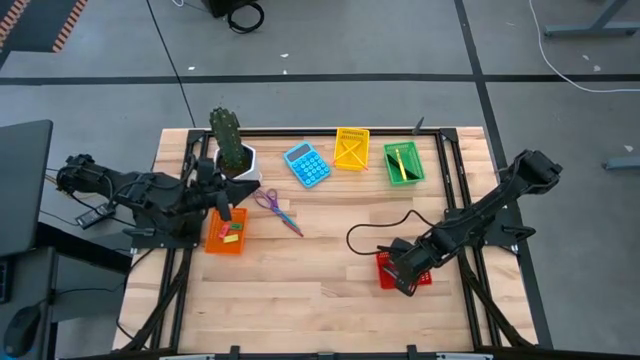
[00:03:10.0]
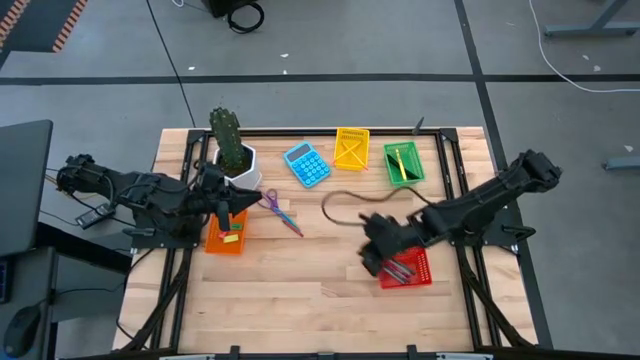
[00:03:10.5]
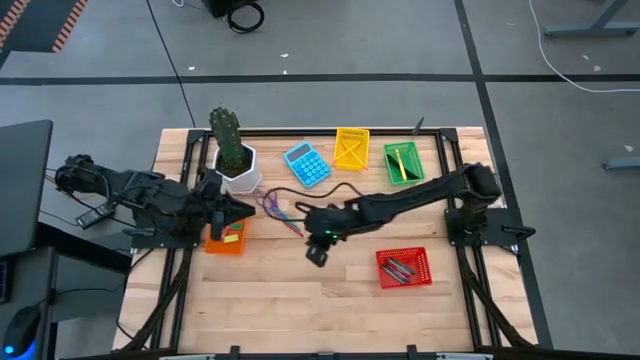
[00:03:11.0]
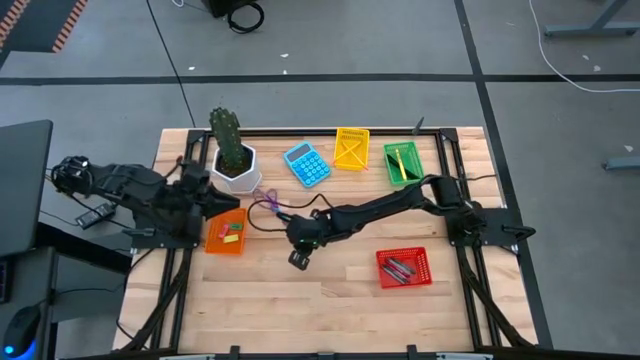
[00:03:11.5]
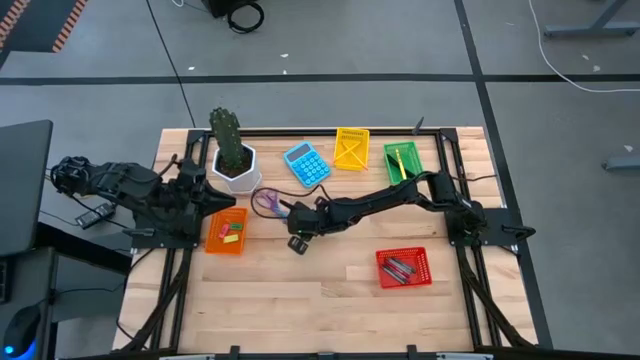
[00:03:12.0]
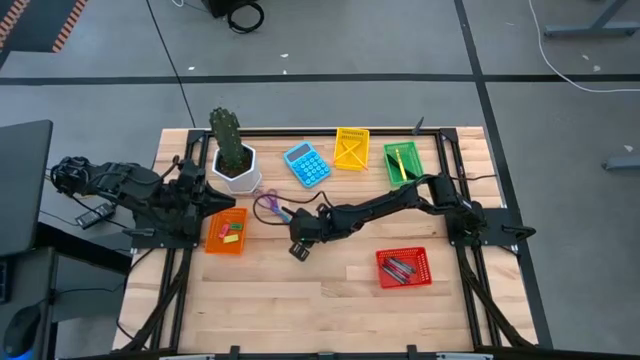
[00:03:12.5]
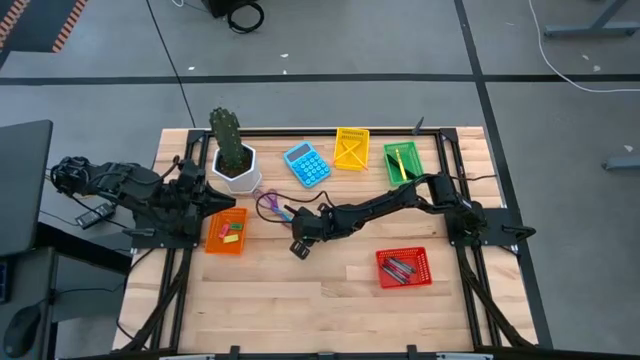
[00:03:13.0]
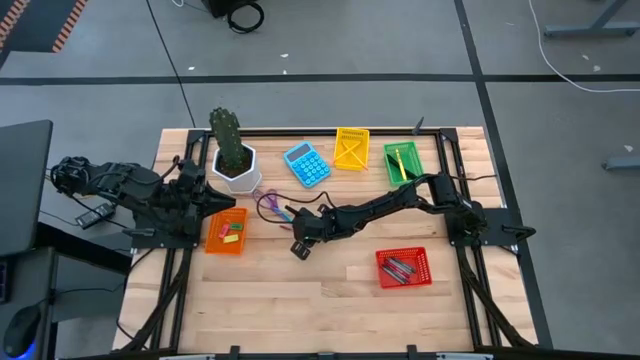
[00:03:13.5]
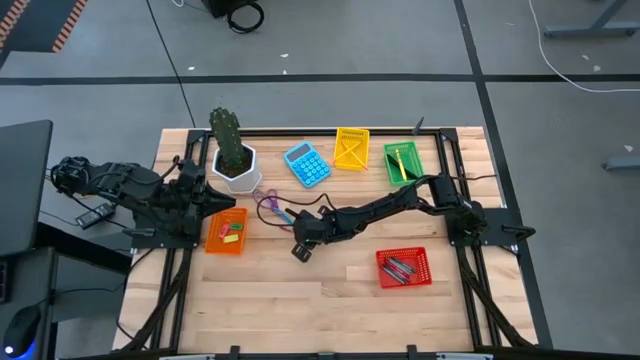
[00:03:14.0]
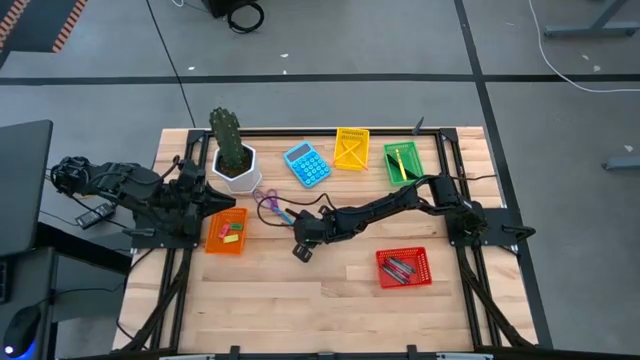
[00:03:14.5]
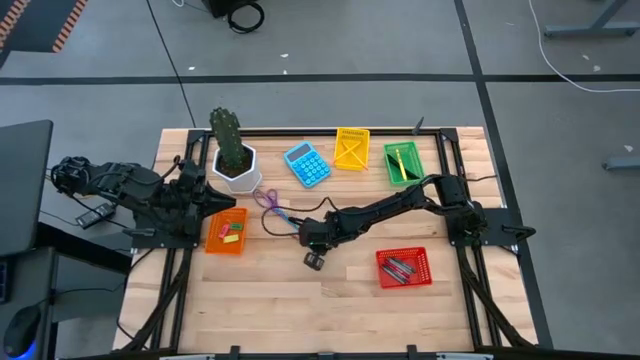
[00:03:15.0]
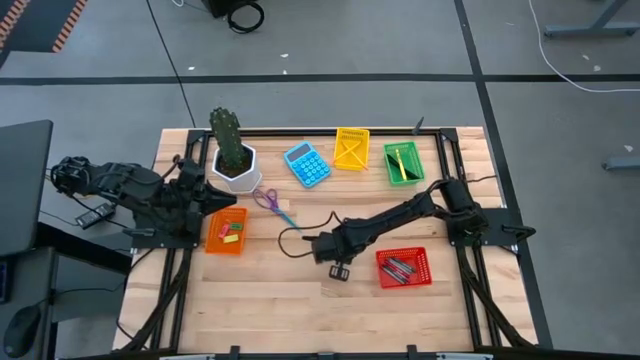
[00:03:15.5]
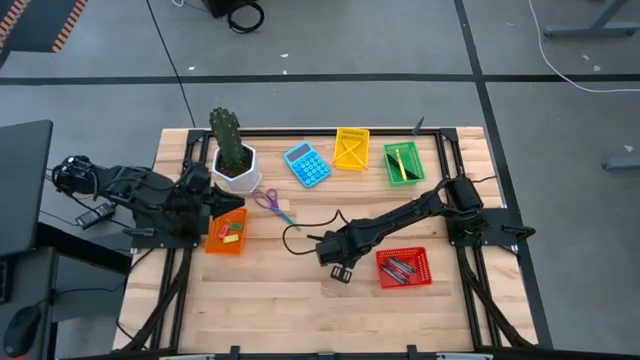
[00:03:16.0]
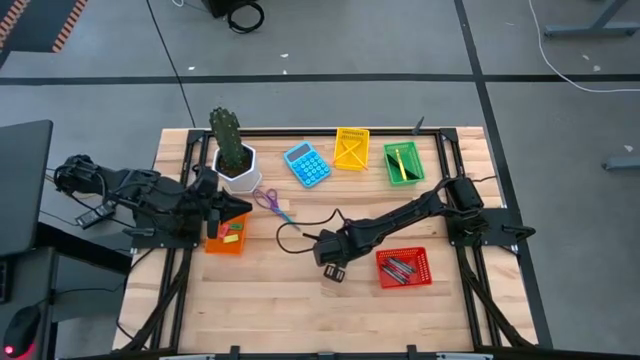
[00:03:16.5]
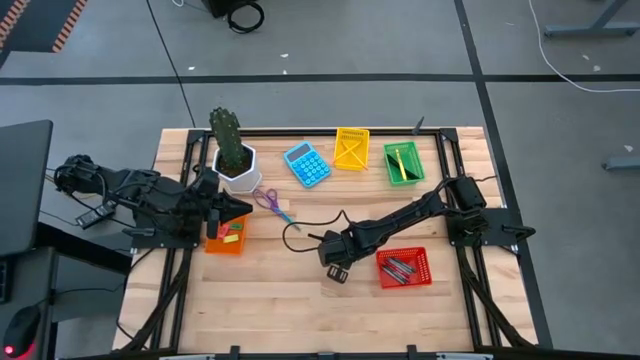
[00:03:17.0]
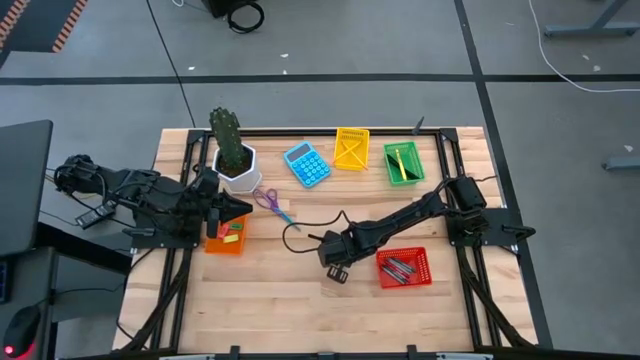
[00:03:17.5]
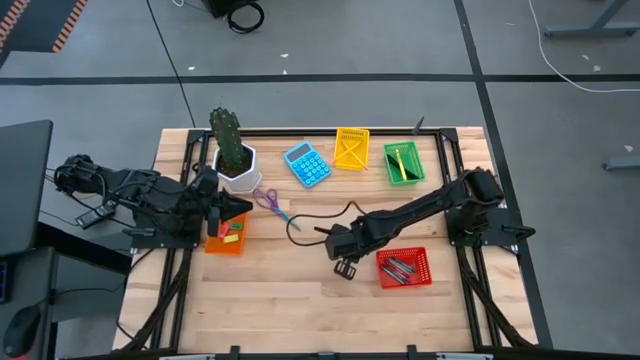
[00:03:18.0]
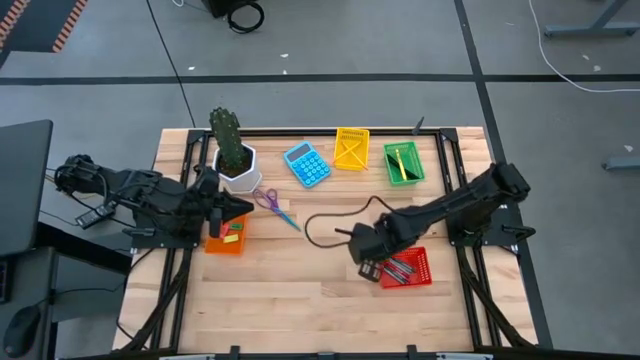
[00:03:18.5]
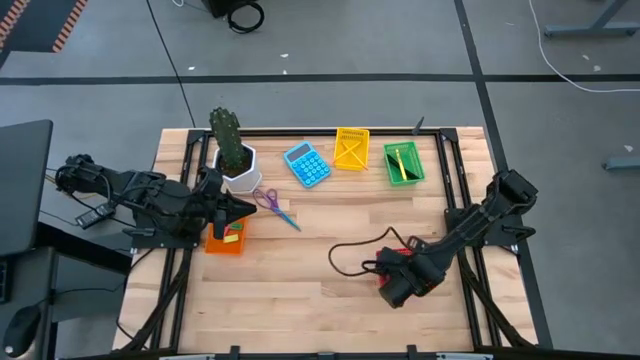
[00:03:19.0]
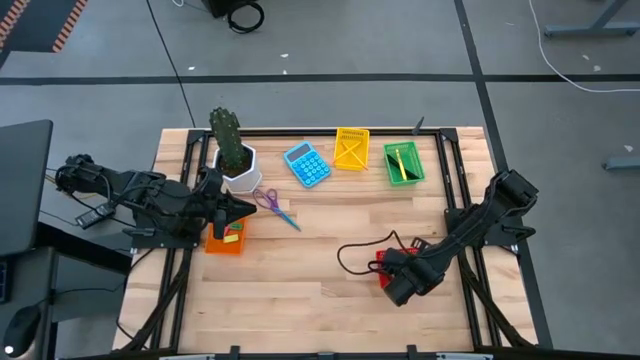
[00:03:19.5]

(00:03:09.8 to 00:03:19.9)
Task: Sort crayons/erasers/pens/pencils in bins
Put the red crayon into the red bin

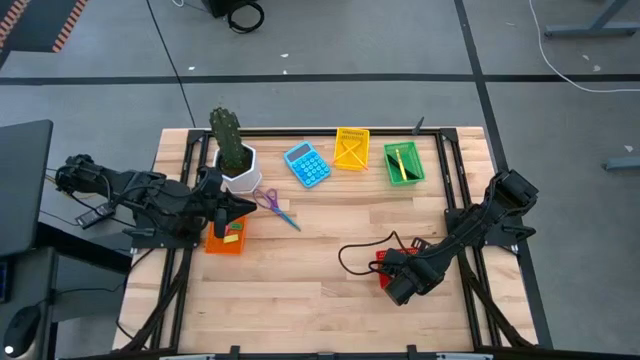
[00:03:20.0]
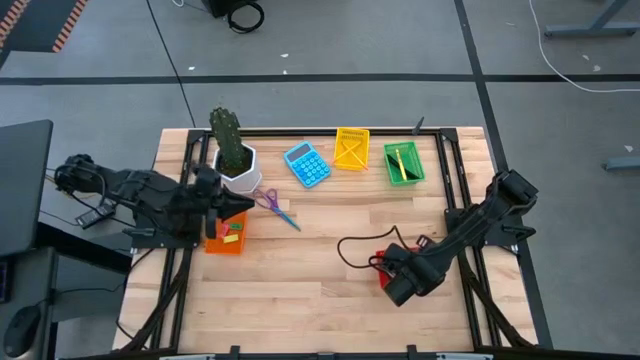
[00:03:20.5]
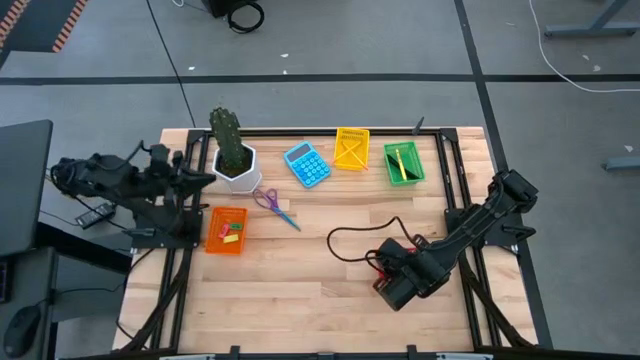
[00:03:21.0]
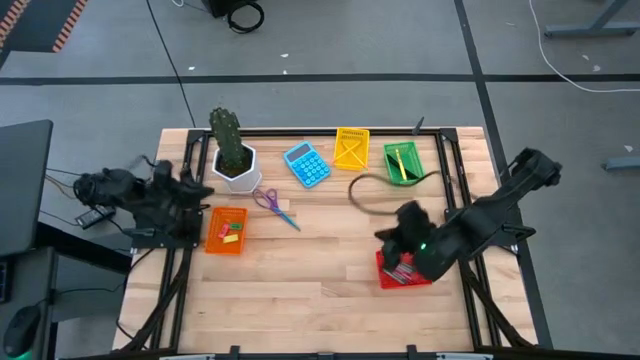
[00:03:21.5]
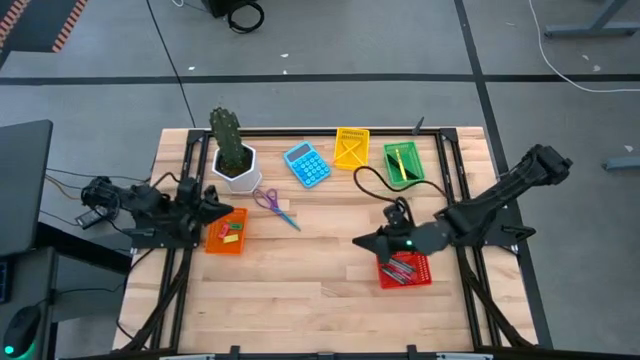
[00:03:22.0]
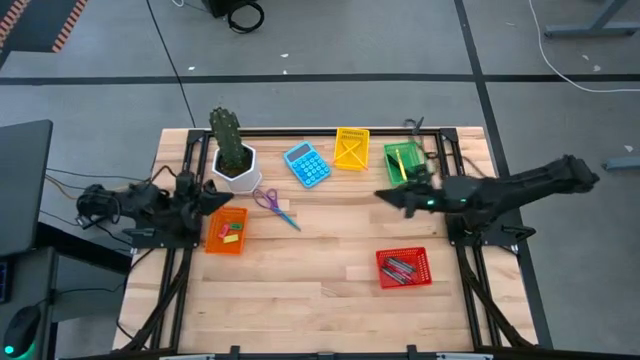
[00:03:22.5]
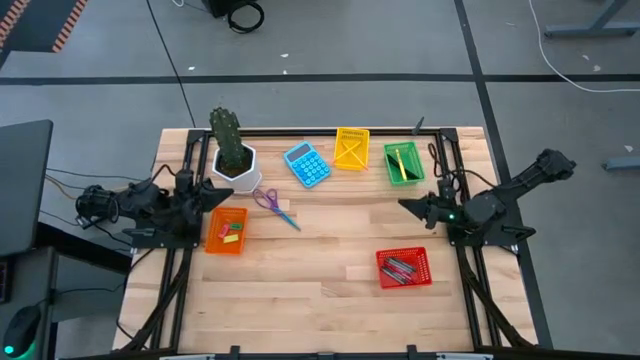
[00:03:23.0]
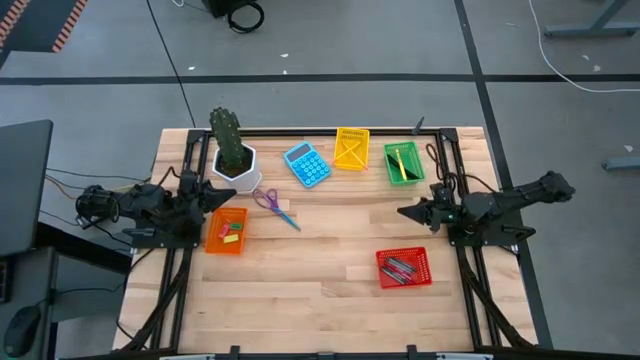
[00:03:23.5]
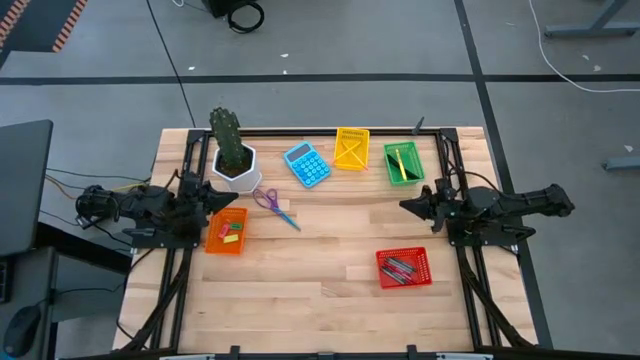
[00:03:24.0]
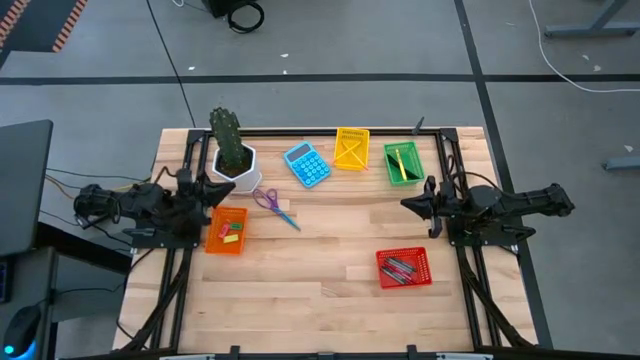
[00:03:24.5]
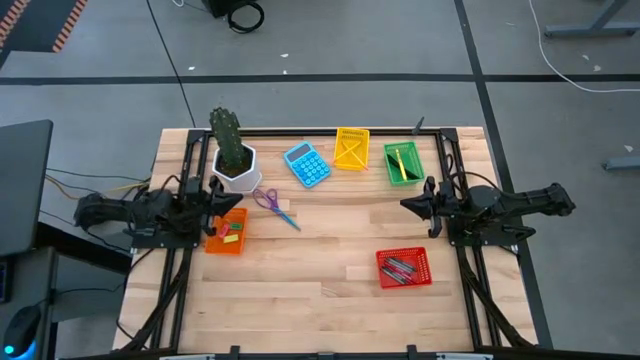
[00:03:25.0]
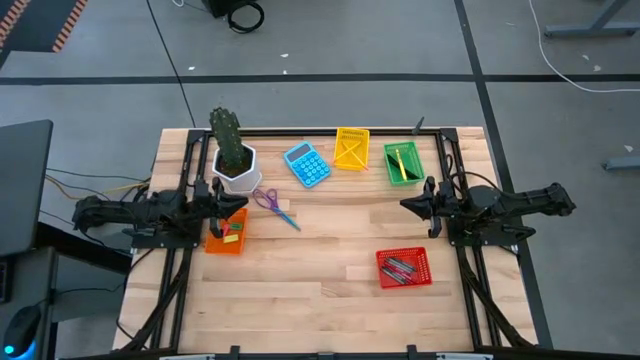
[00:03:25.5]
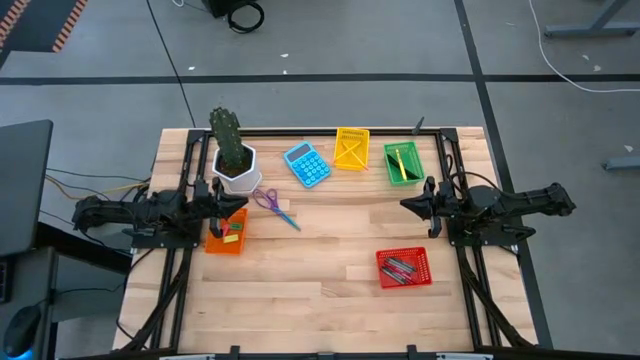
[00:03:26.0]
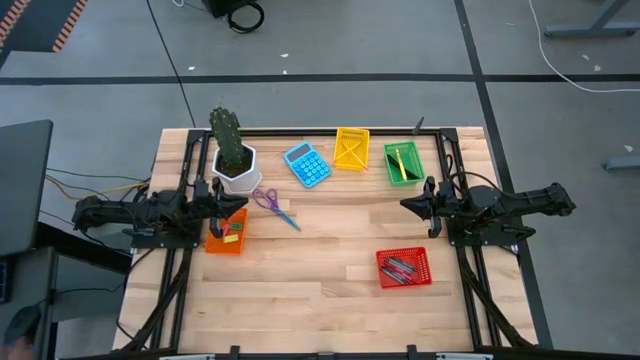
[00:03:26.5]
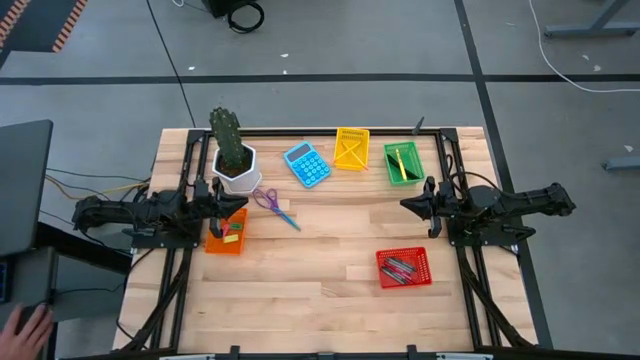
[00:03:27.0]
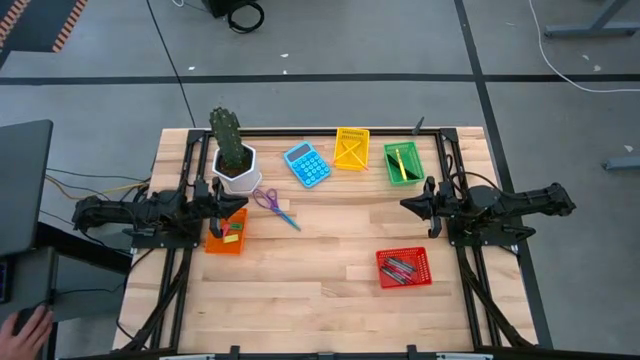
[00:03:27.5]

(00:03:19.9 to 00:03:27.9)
Return to Home Position

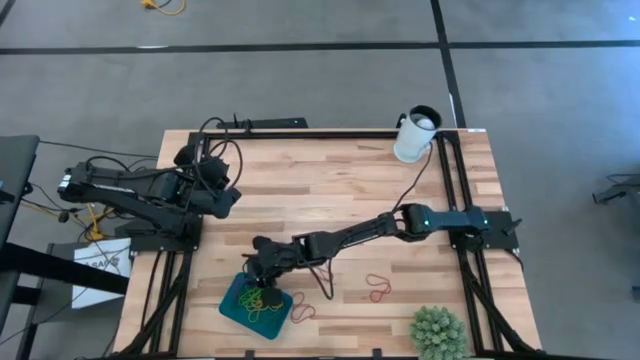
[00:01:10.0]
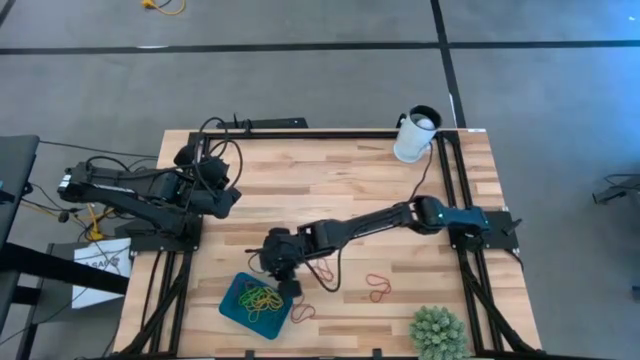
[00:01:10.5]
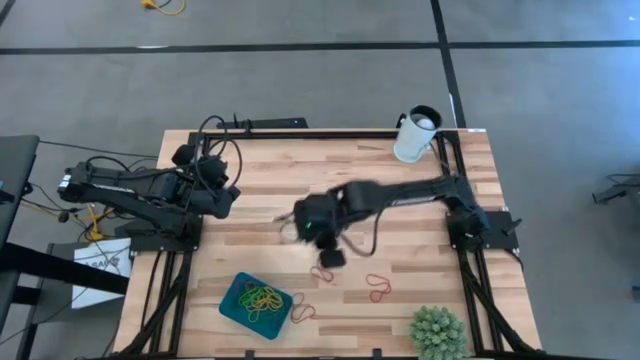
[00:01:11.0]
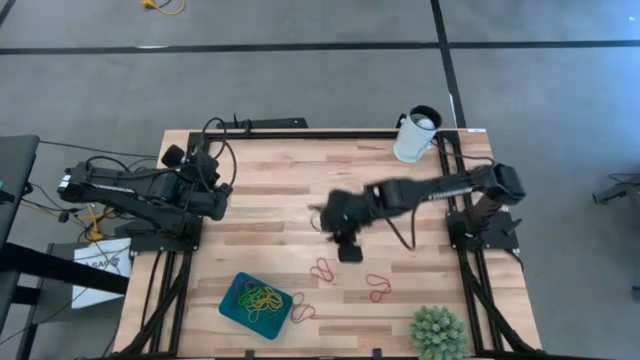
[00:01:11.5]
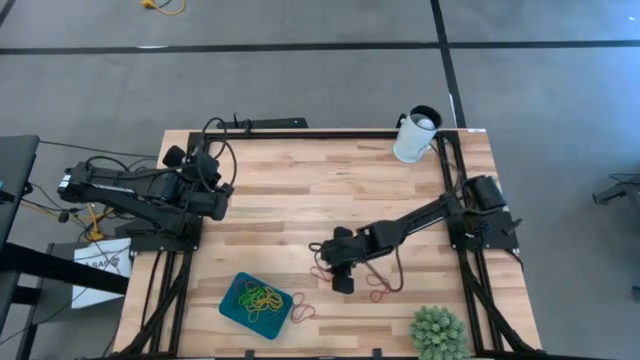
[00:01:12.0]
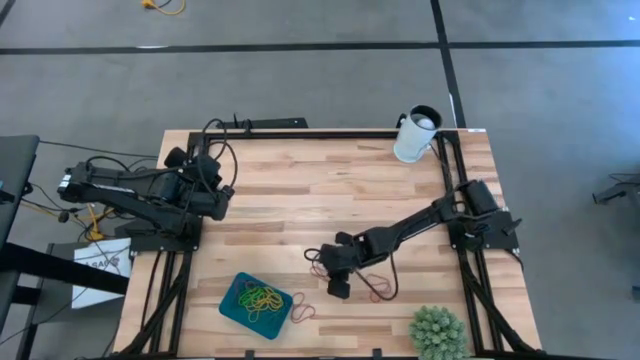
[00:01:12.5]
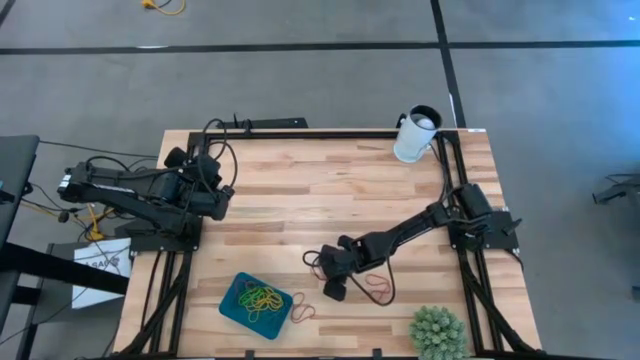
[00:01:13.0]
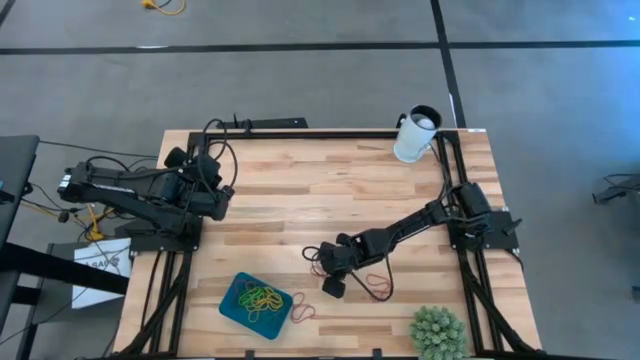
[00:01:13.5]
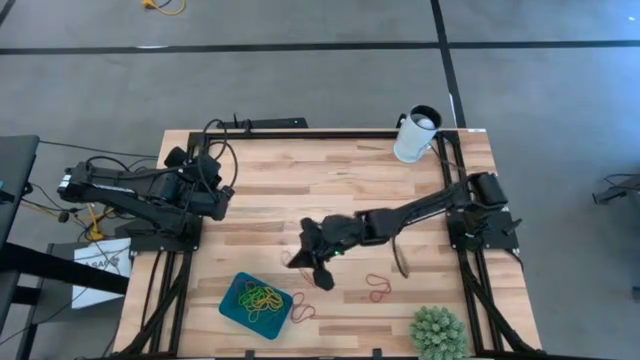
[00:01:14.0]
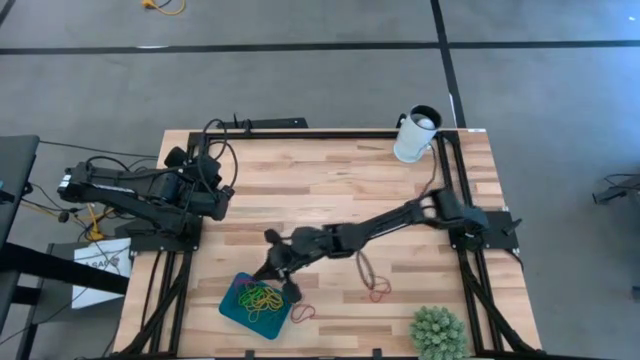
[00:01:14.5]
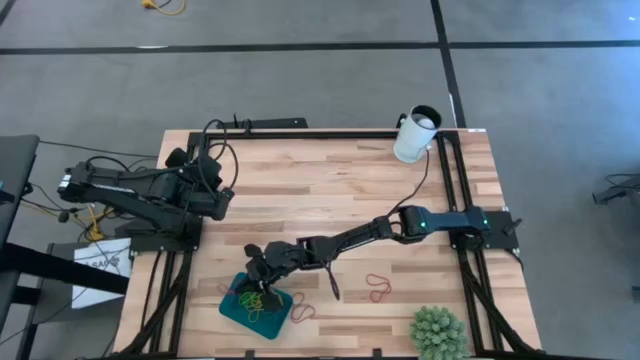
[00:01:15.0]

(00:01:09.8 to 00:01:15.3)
Task: Pick and place items into bin
Put the red rubber band into the blue bin
